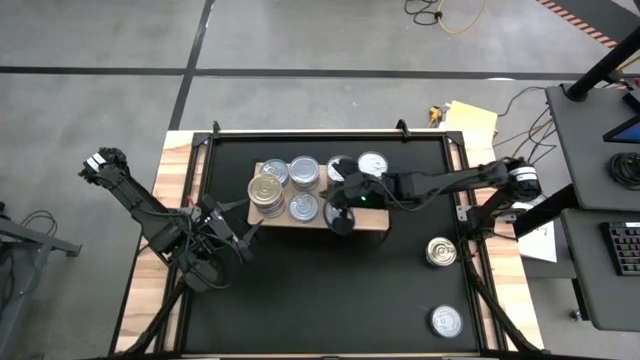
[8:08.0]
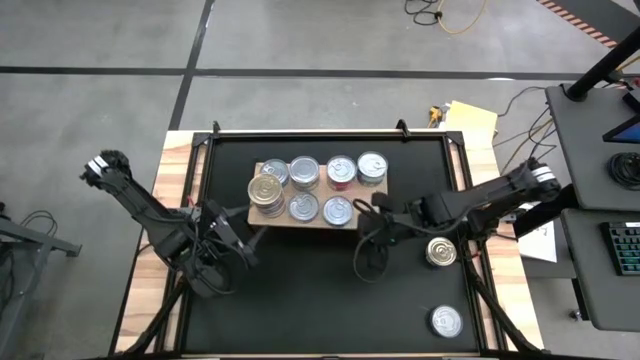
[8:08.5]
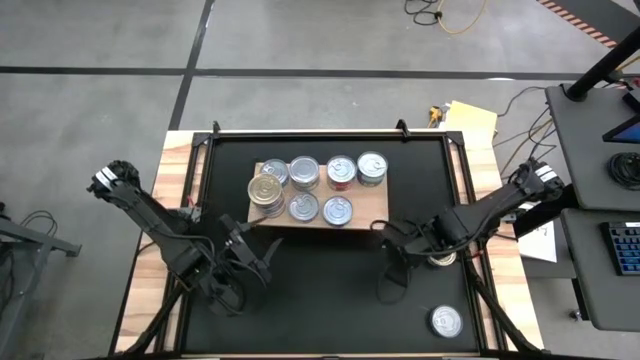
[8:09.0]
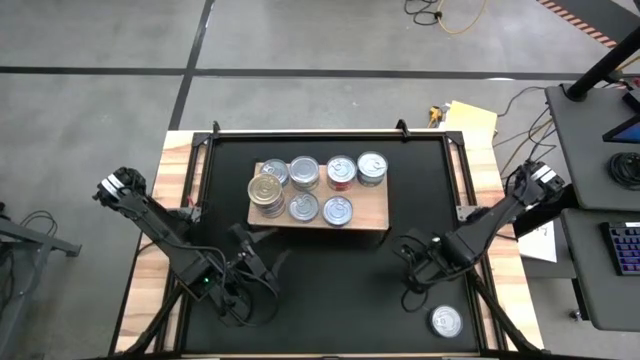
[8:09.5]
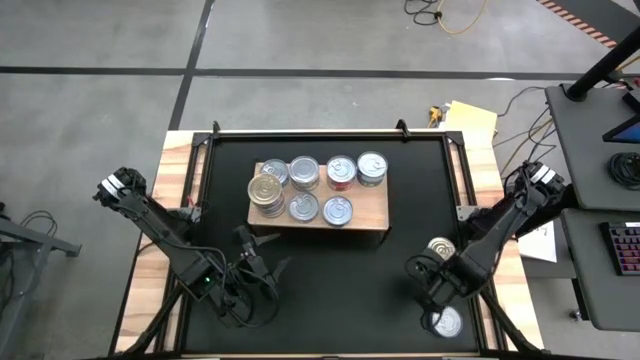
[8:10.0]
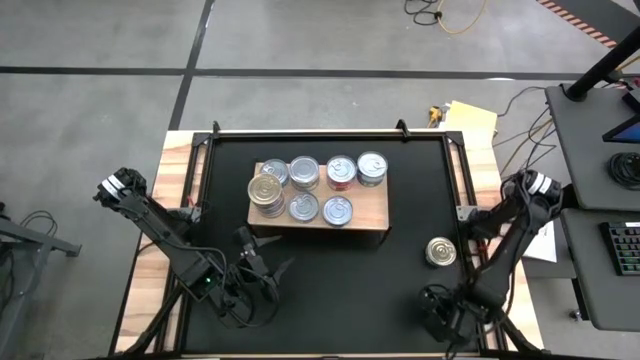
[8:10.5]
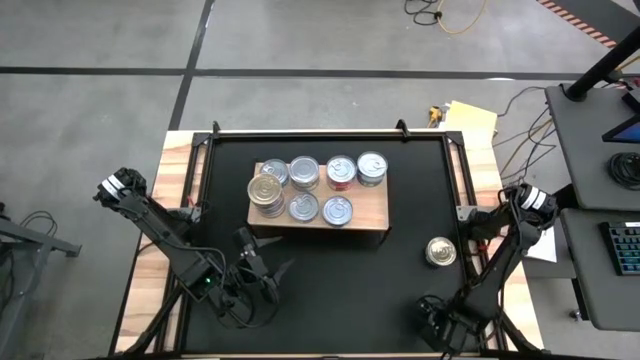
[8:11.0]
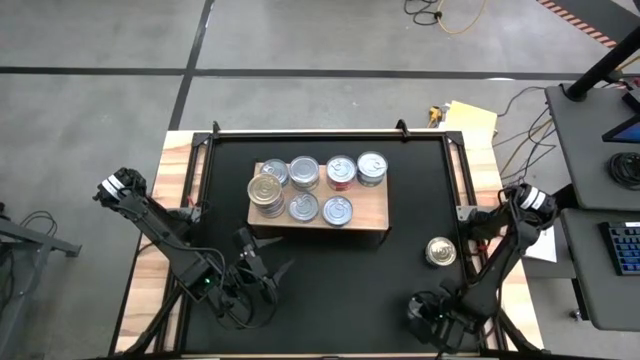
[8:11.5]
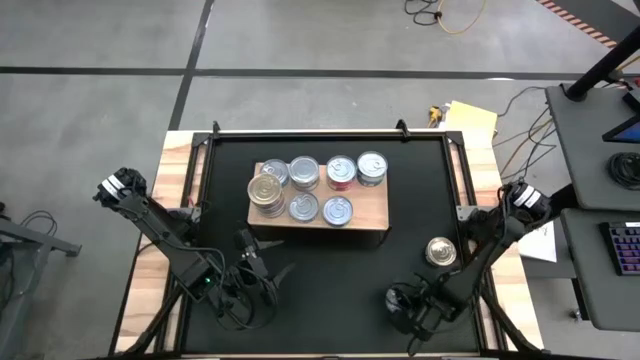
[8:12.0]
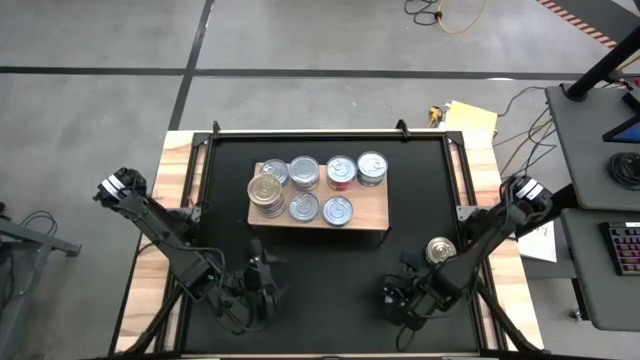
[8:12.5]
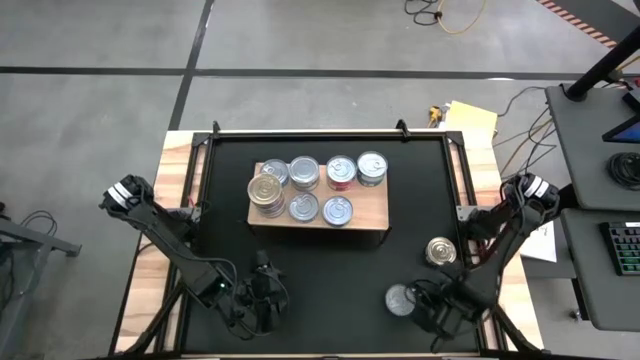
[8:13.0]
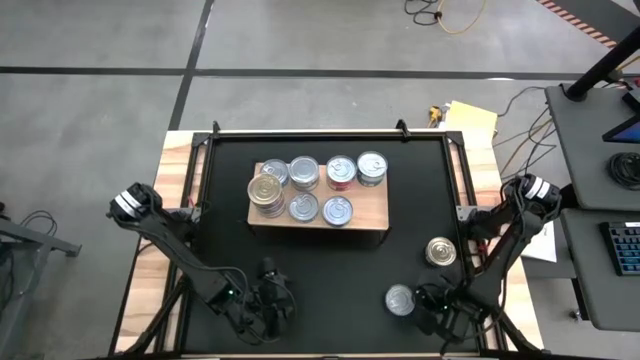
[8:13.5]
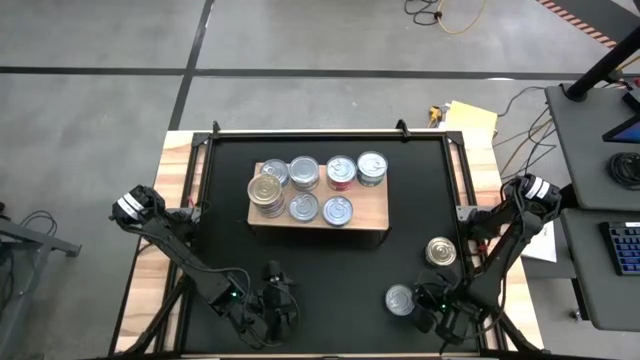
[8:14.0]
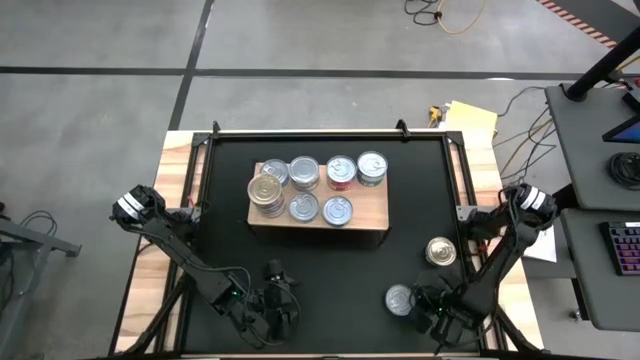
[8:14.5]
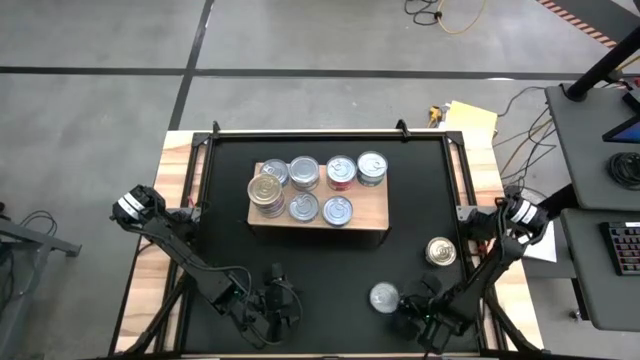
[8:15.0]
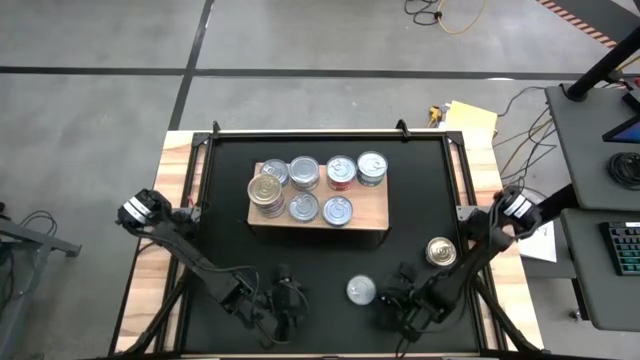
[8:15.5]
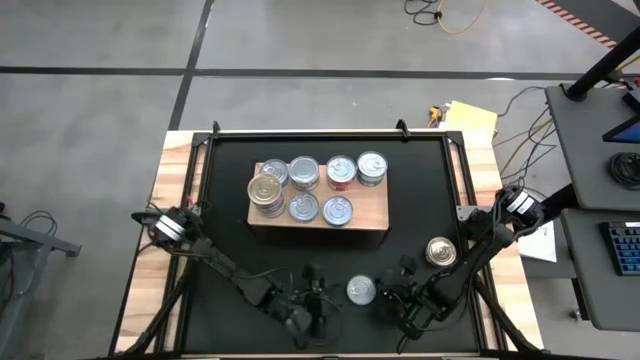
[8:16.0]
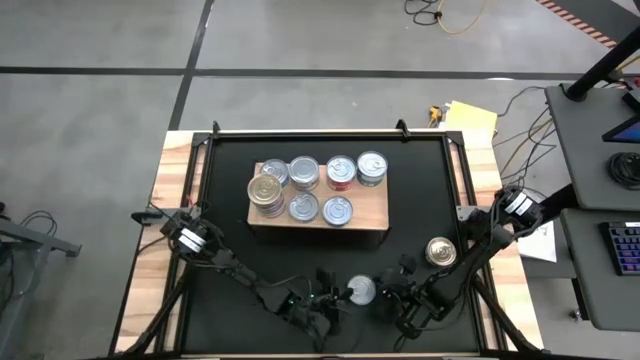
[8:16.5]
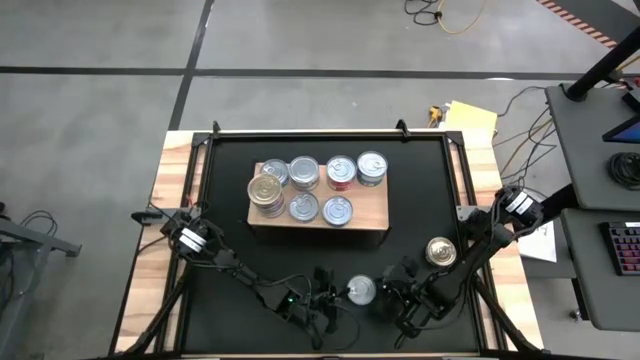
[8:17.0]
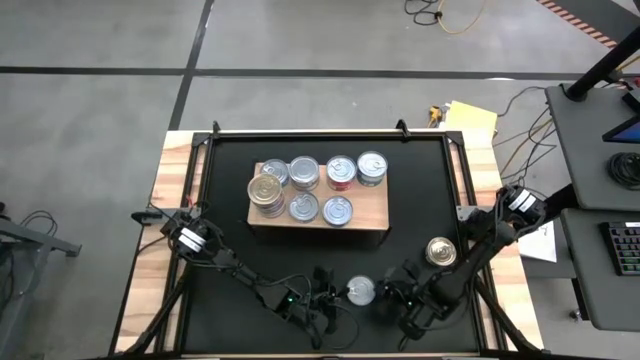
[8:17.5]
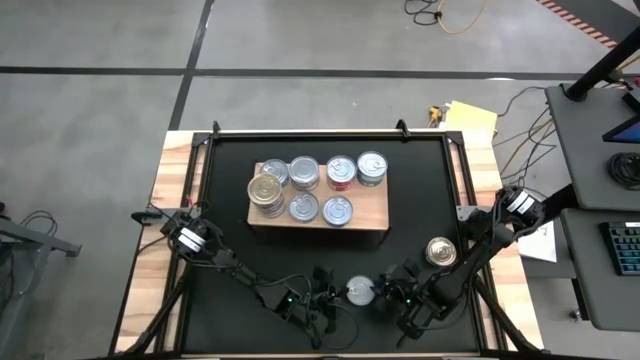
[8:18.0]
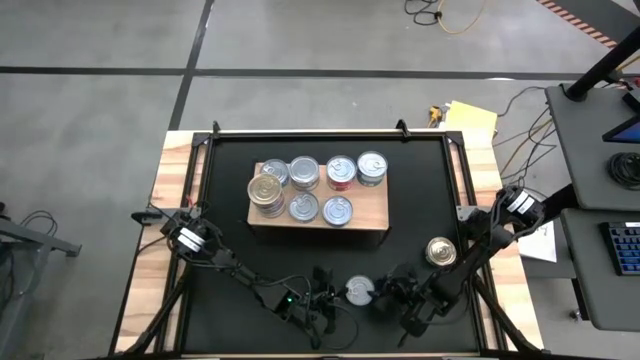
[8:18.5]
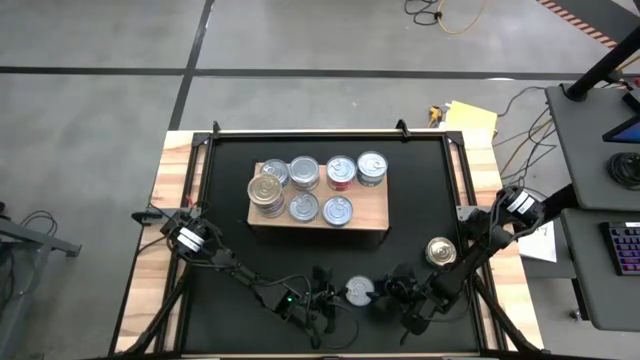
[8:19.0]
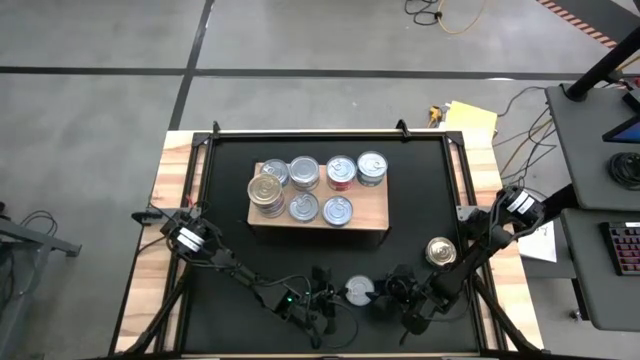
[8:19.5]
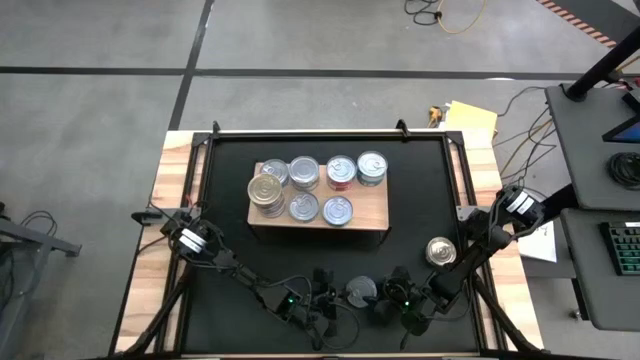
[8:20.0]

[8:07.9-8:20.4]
Task: Stack canned seafood by type on shelf
Stack the dark blue tuna can on the dark blue tuna can

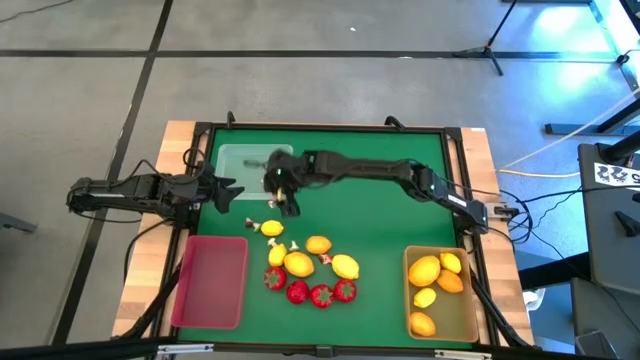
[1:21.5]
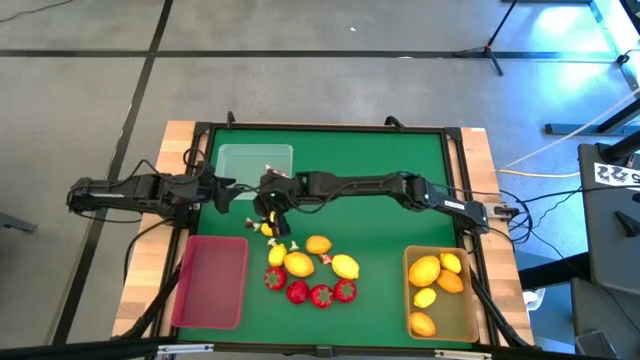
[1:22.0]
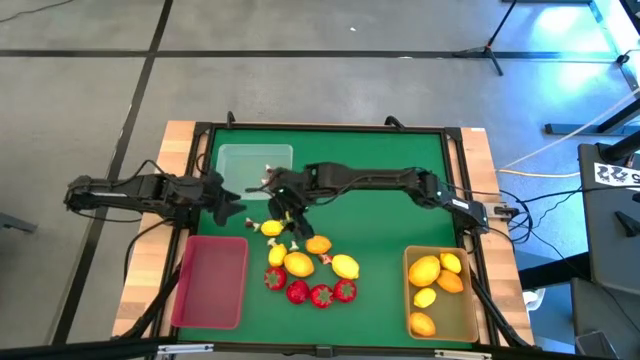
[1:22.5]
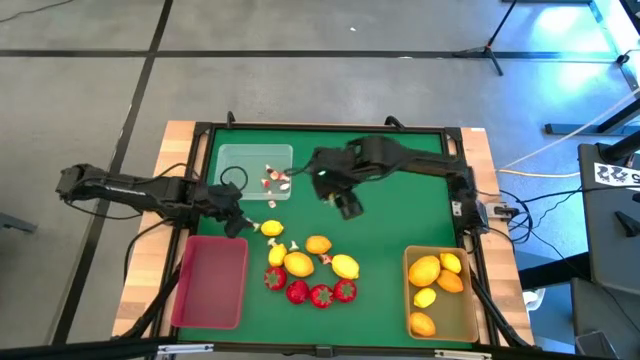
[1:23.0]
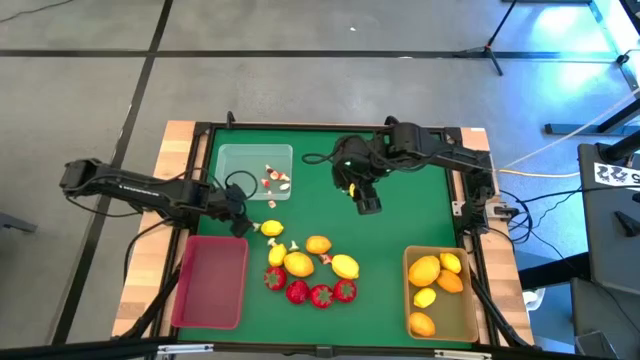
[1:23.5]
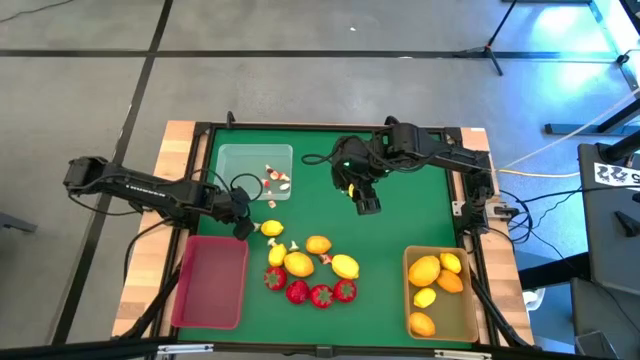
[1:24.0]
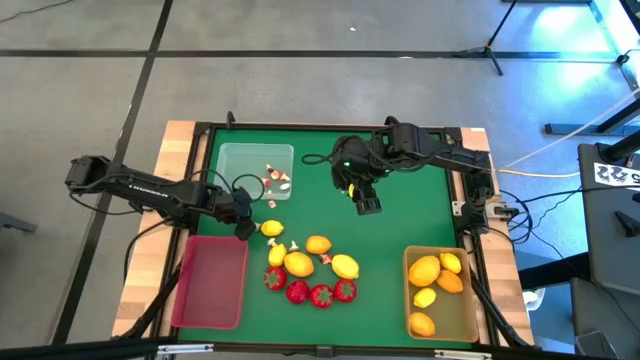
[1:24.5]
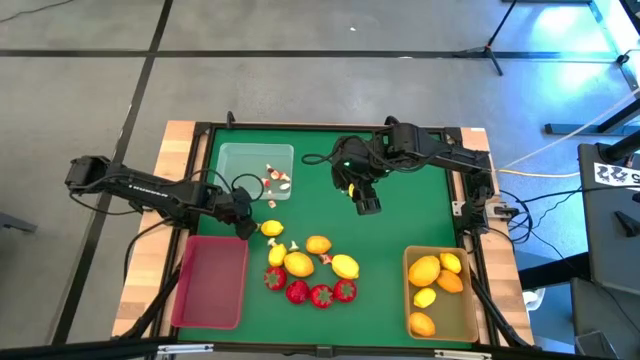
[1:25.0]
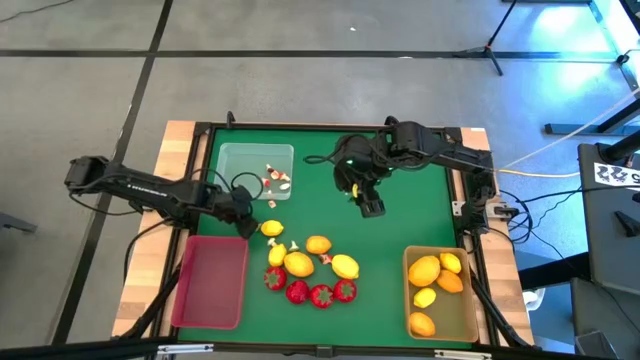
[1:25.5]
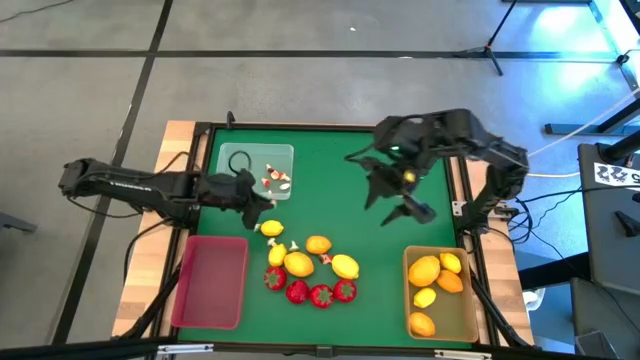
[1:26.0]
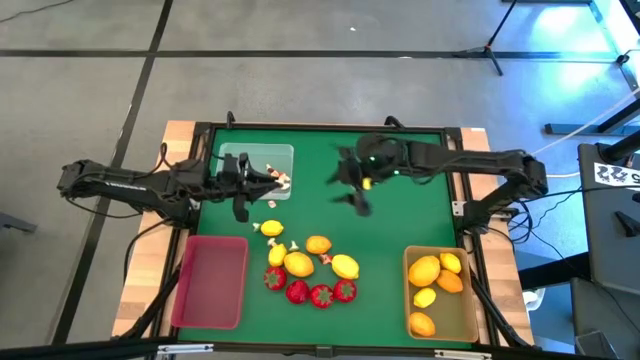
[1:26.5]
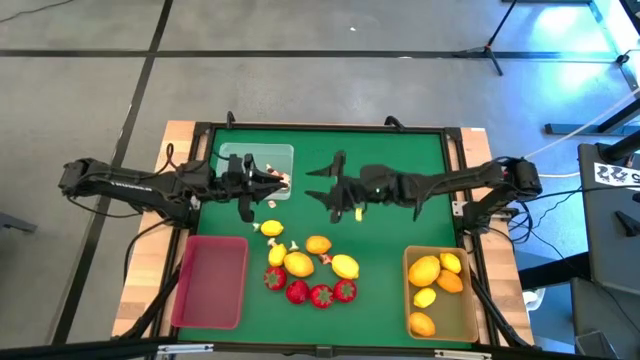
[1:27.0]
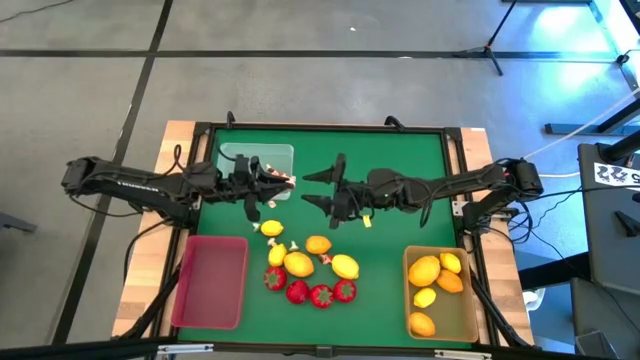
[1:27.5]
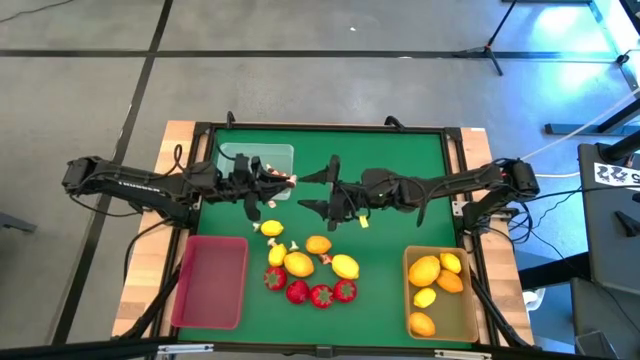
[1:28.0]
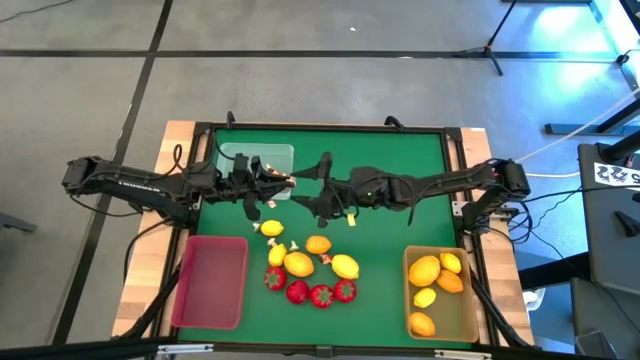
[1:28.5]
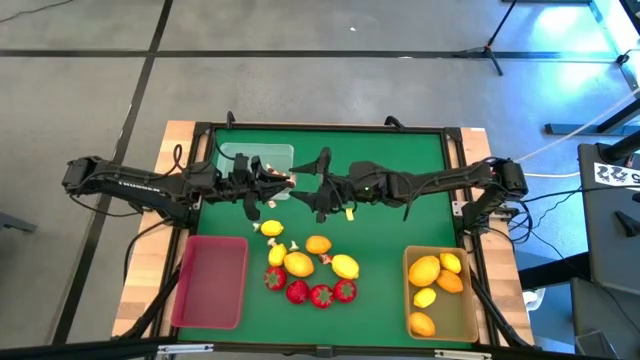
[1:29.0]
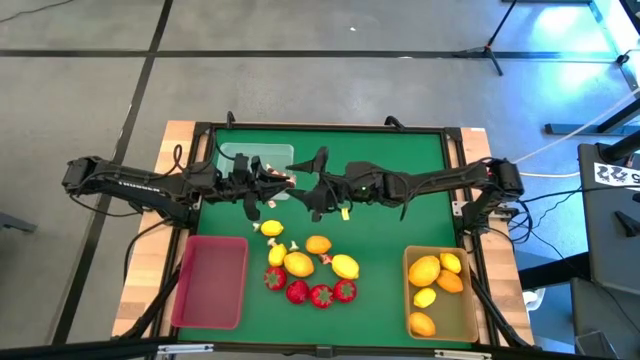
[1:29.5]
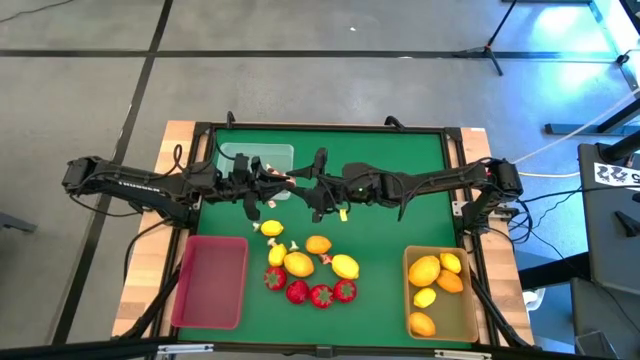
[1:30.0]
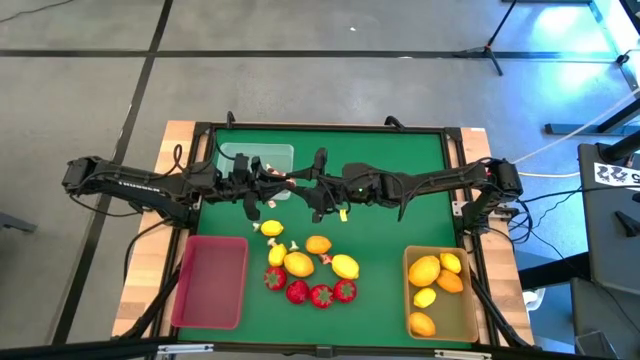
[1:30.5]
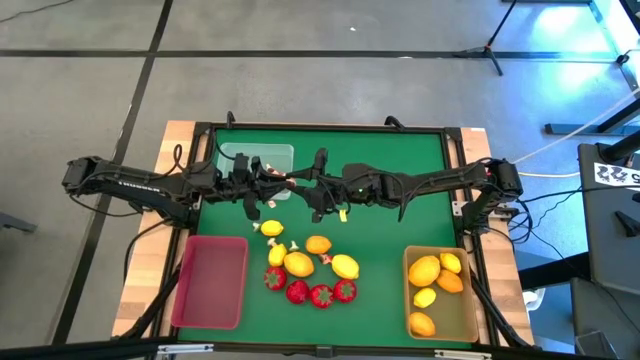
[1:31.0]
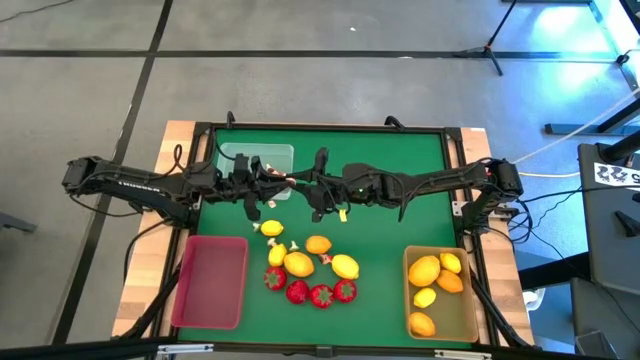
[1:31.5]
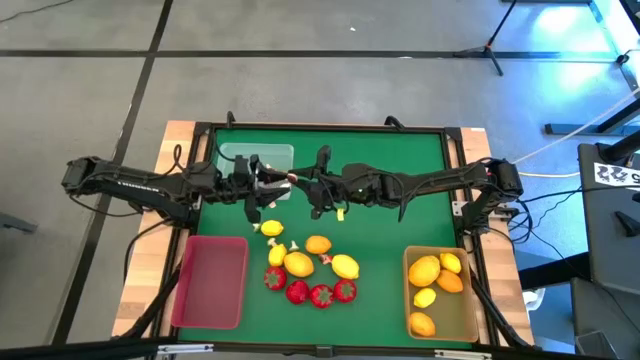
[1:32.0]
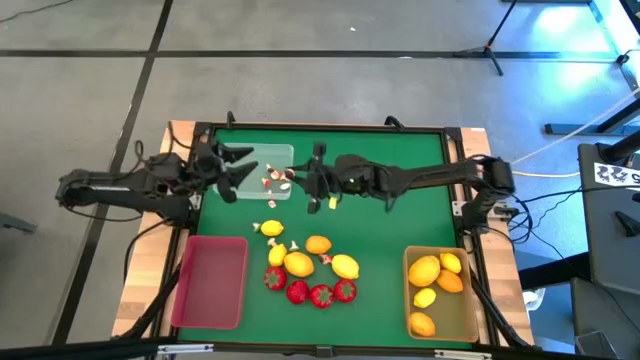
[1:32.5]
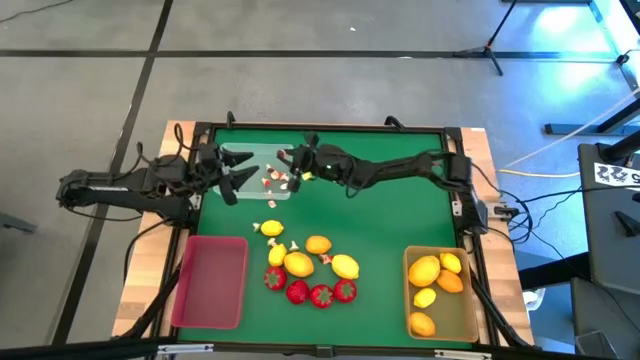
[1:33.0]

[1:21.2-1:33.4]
Task: Sort produce into baskets
Put the brown mushroom into the transparent bin
